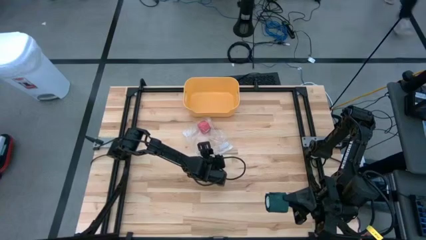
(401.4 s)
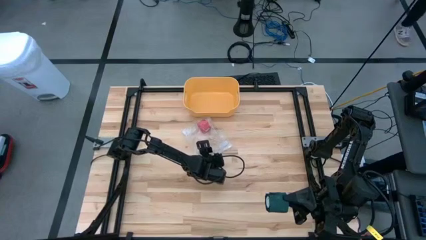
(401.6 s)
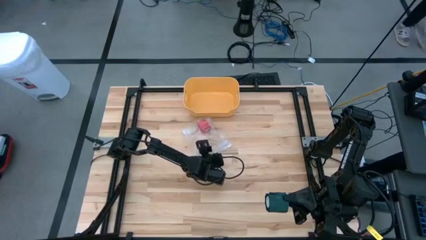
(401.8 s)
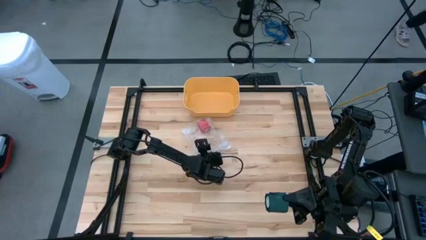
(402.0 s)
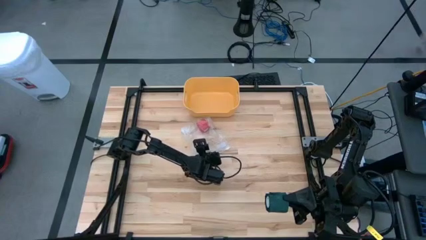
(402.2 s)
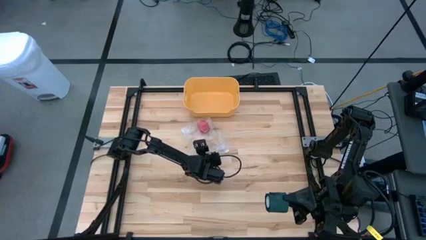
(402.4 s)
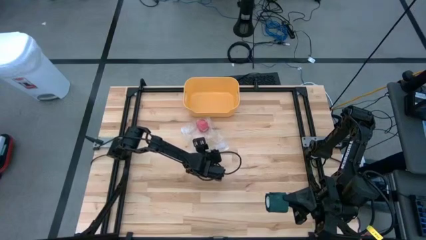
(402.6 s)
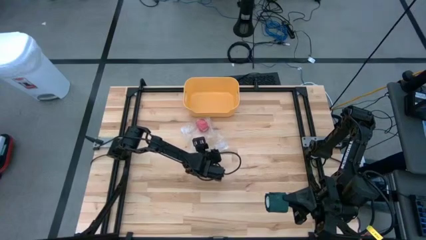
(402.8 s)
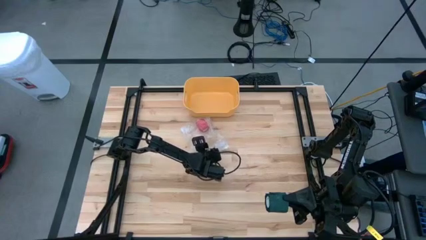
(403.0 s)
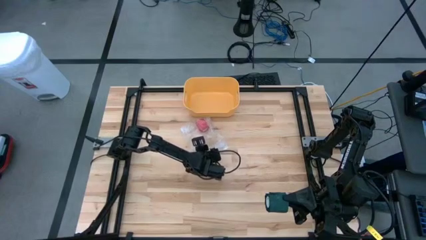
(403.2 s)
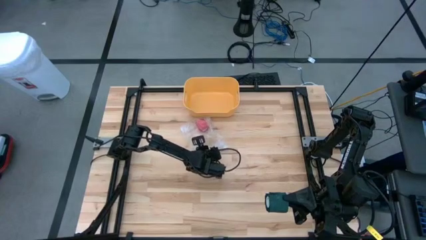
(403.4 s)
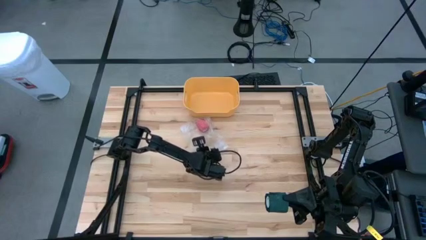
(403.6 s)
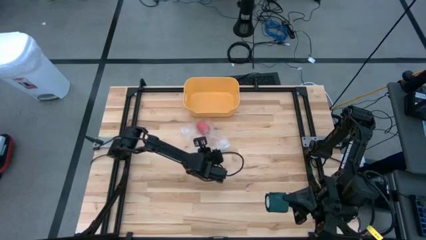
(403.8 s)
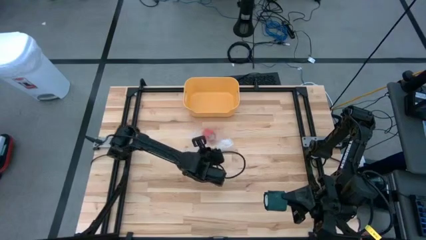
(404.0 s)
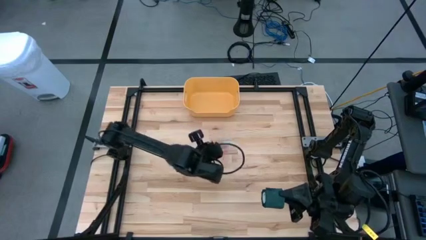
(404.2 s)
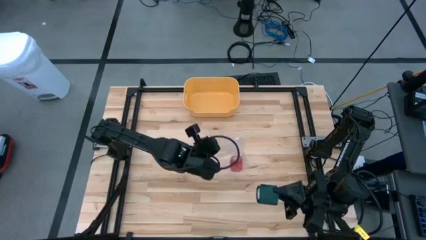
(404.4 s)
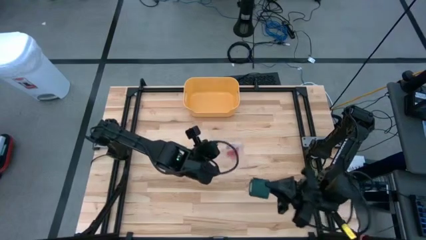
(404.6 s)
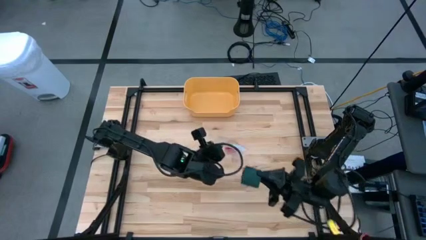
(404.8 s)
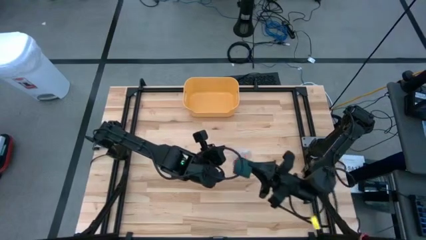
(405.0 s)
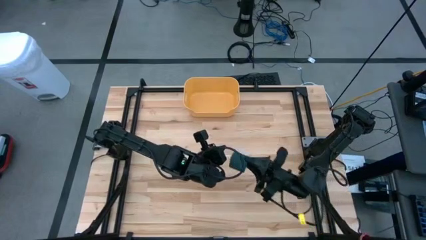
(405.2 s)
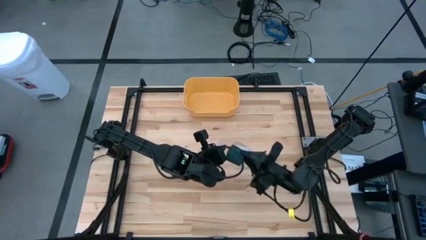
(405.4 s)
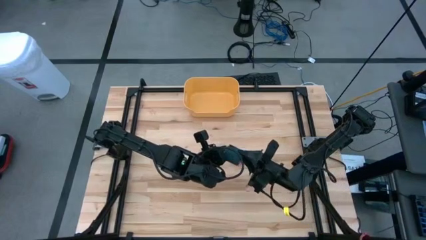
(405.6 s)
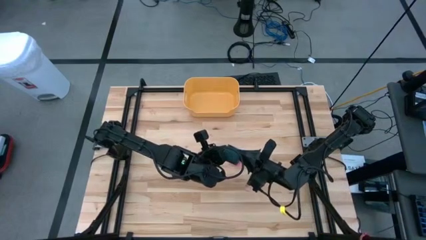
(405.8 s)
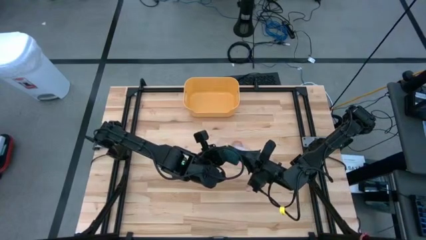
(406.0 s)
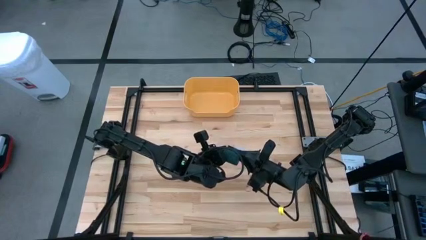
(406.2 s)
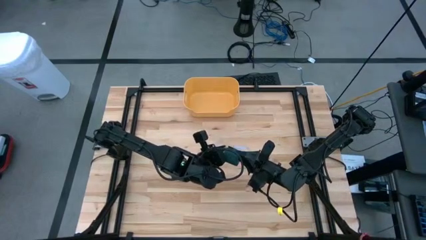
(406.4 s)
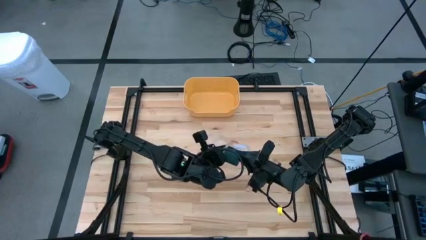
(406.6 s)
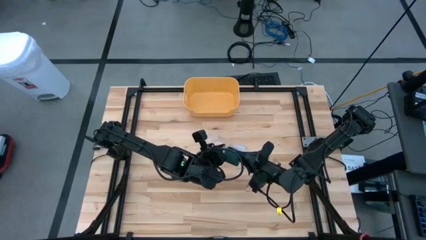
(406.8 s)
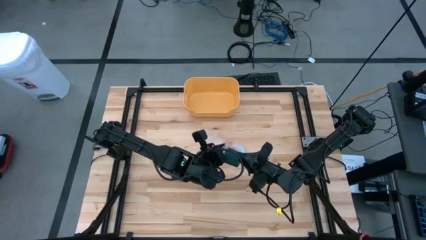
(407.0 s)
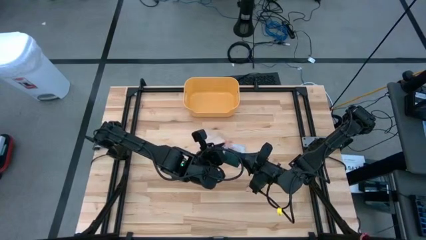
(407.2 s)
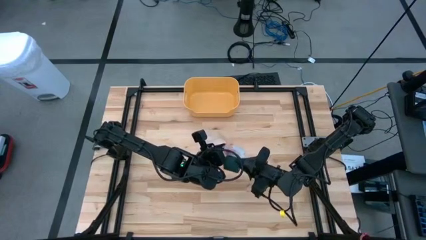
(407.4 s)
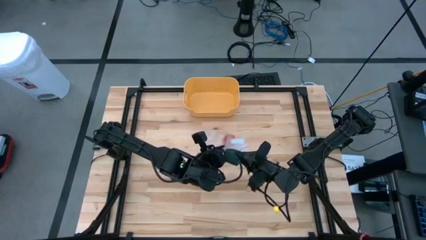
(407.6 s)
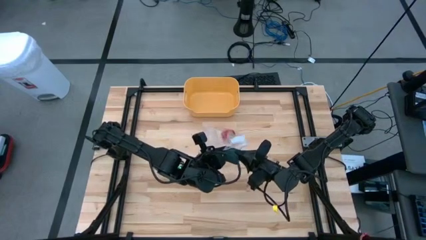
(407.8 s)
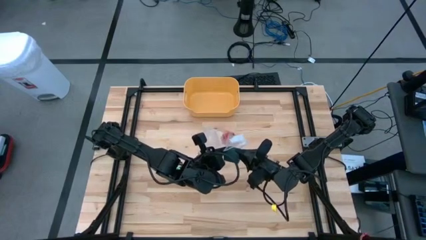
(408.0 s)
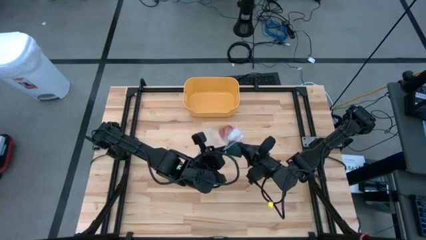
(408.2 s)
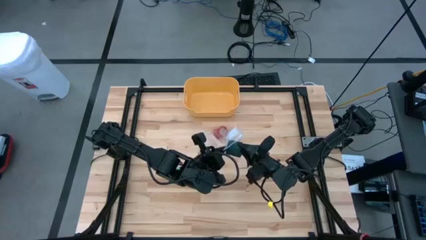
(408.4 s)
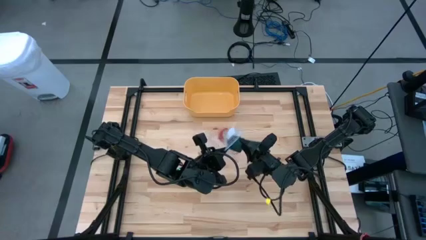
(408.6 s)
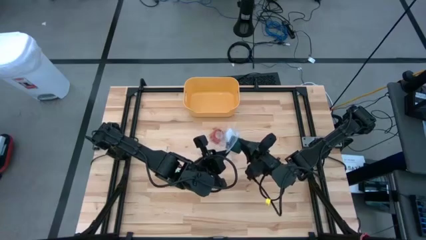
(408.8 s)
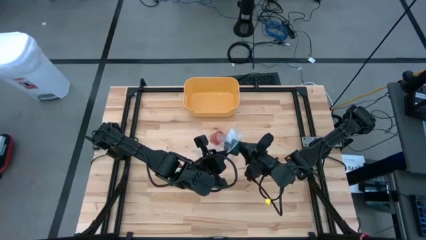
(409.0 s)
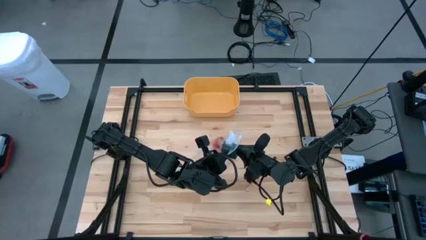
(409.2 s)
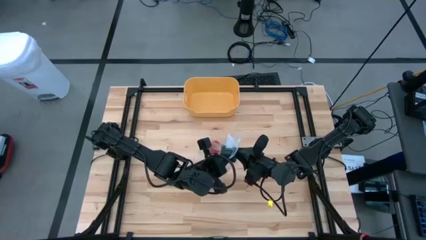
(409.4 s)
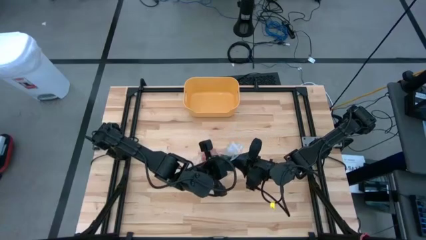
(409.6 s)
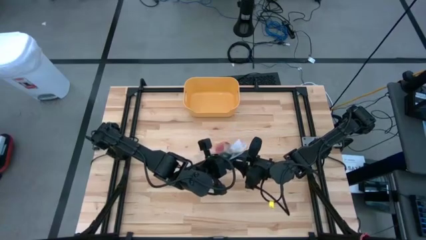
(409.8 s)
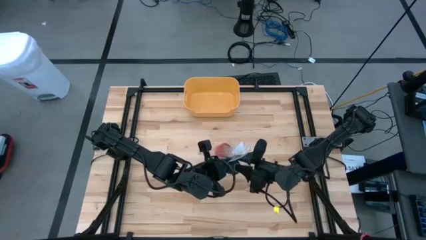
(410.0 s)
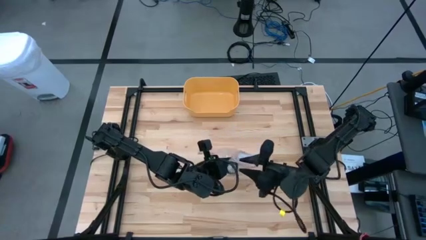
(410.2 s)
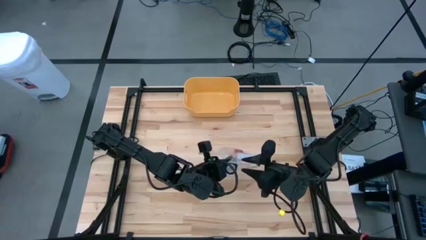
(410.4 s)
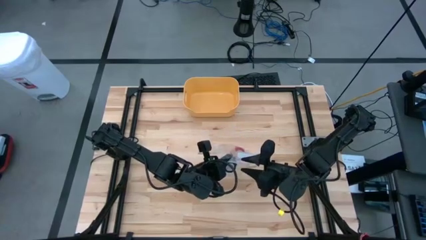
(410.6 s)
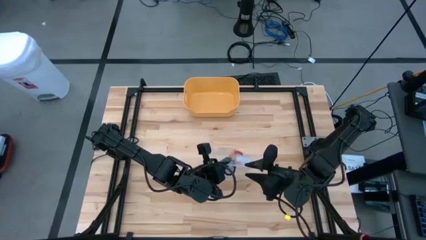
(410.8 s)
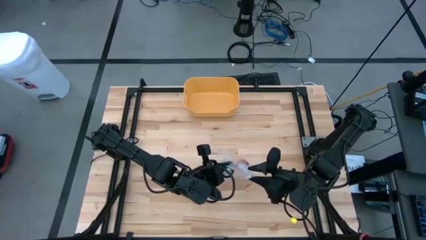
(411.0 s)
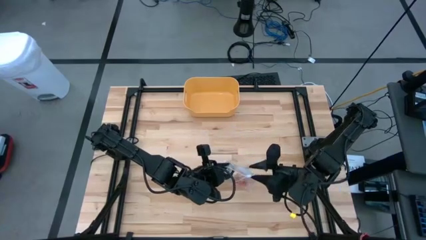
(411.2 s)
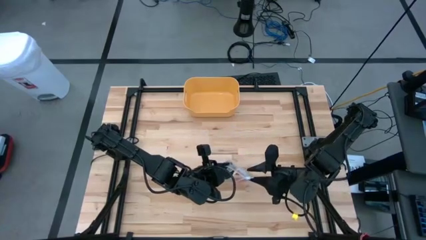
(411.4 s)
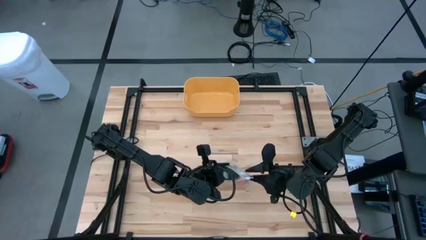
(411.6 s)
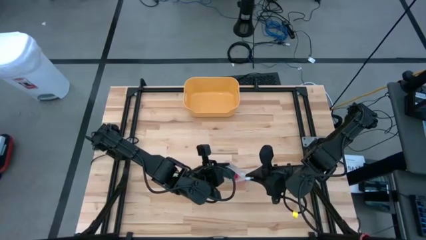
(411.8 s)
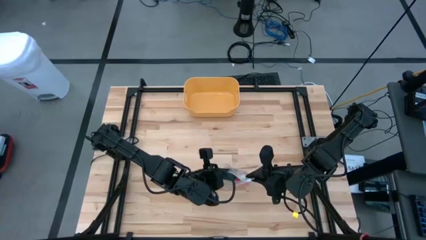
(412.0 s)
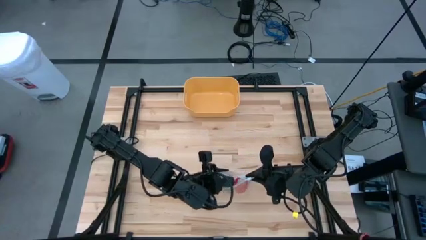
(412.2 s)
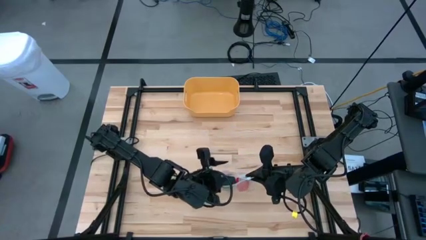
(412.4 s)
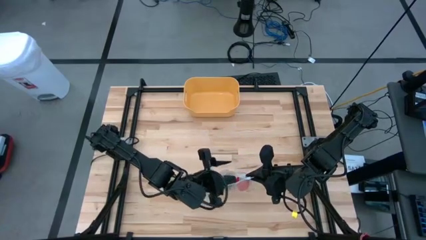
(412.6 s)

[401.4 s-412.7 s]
Task: Roll bandage
Put the rolled green bandage into the transparent zip bag

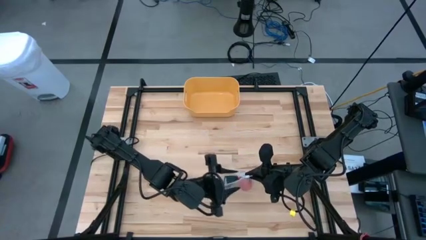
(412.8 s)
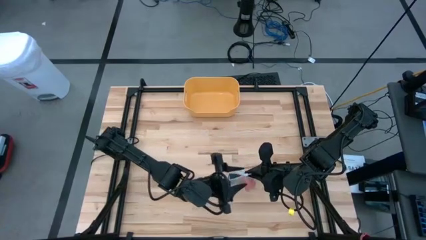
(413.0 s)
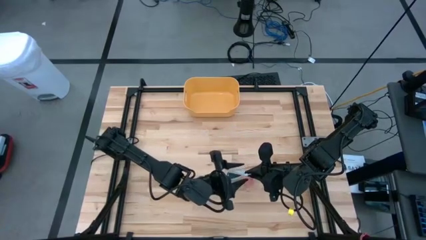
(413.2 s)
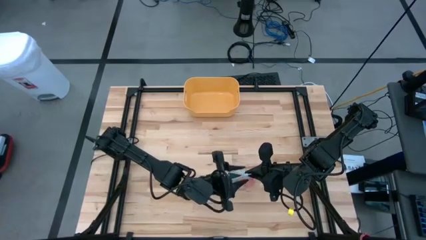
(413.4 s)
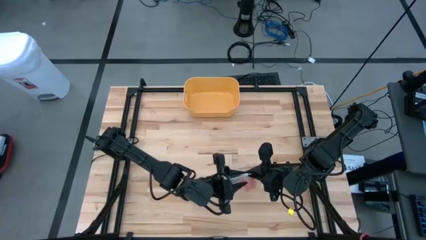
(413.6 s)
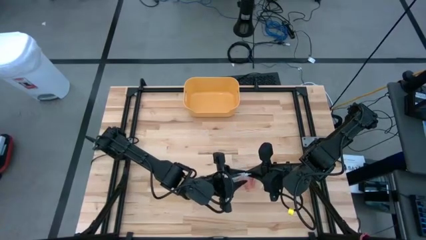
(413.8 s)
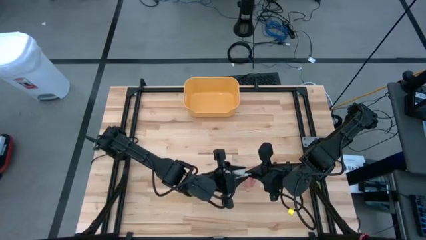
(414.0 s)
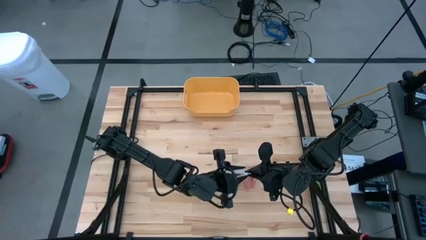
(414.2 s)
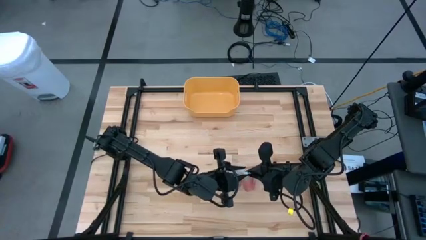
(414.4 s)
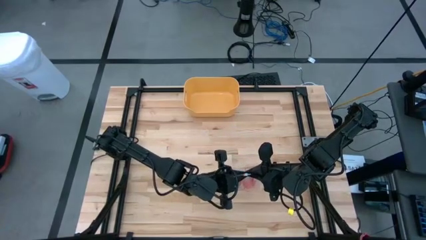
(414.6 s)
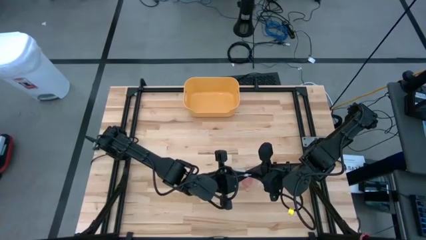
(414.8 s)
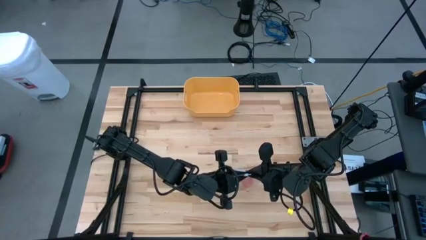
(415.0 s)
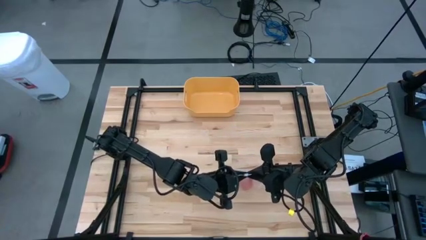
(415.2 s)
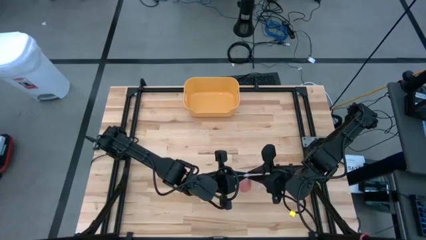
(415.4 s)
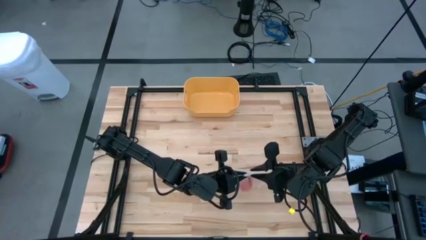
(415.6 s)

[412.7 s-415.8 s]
Close the transparent zip bag

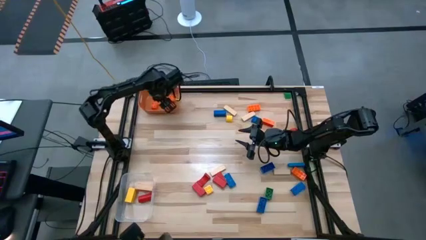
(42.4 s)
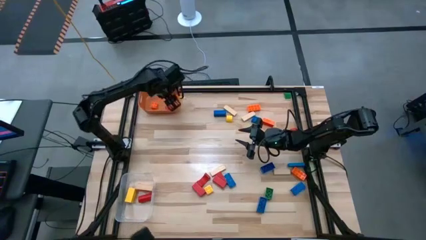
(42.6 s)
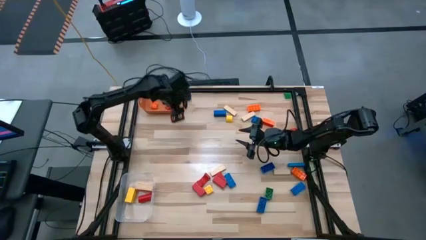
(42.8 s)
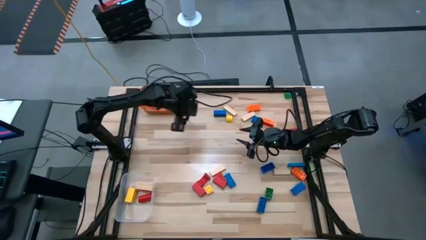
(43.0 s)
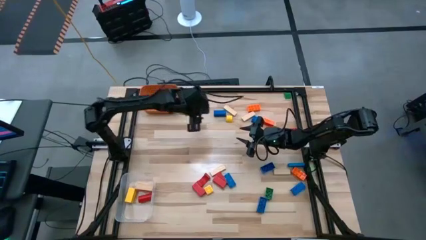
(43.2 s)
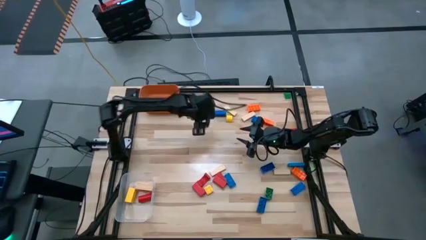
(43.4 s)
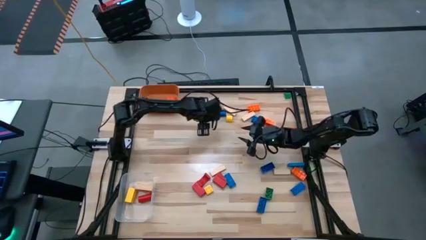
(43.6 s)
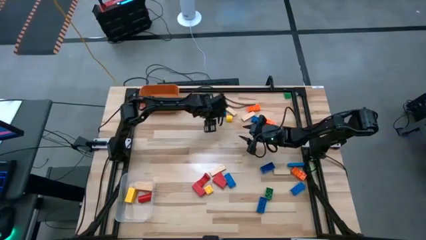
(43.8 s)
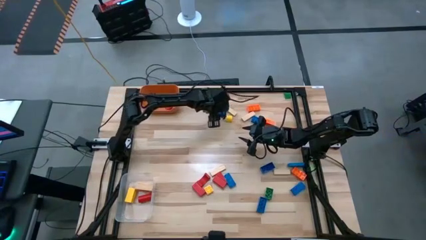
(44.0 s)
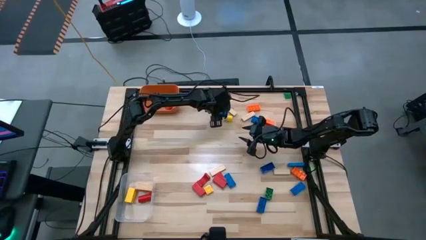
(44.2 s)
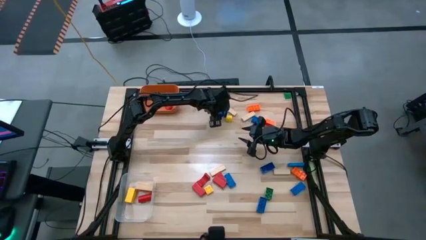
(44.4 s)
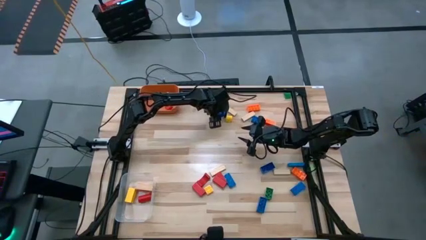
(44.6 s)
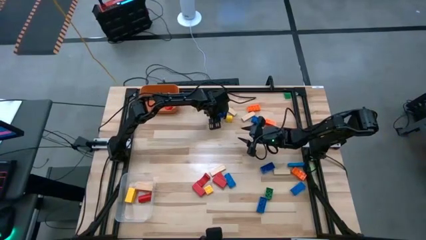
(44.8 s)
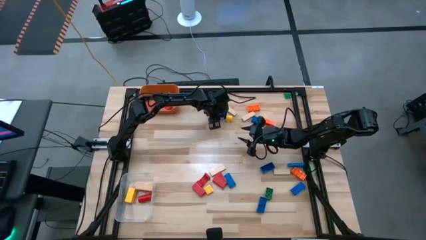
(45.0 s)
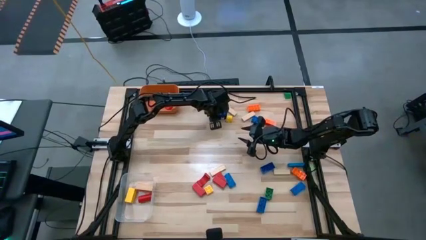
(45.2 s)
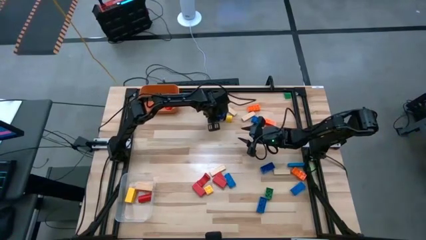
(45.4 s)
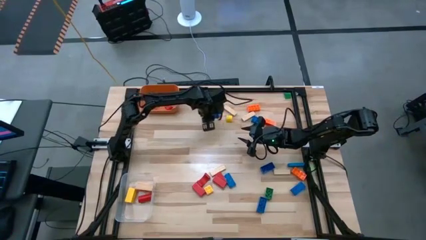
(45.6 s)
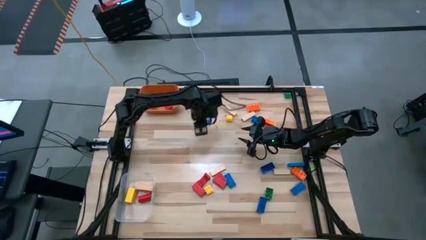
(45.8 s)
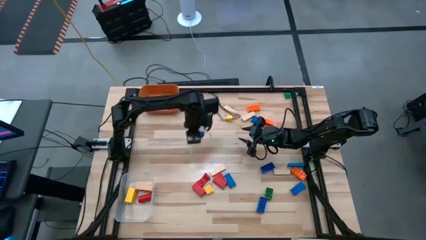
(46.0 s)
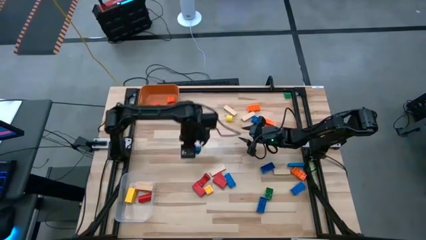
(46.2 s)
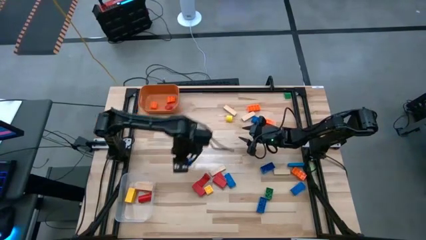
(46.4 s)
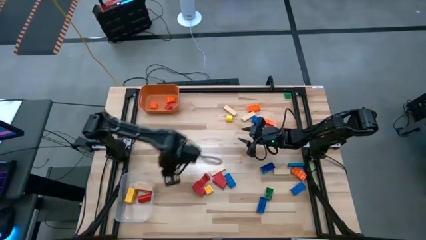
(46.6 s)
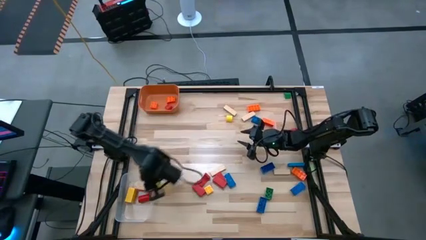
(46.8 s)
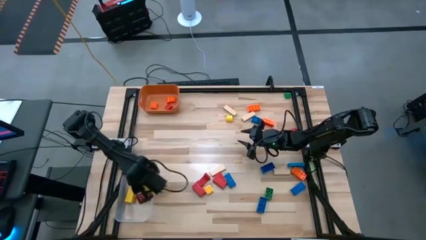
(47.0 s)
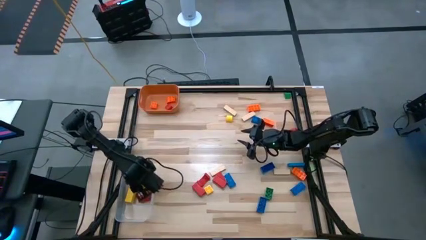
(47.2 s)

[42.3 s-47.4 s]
Task: Sort blocks by size
Put the large blue game piece into the transparent bin
